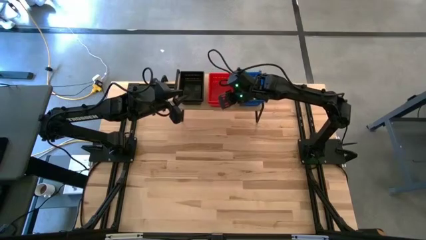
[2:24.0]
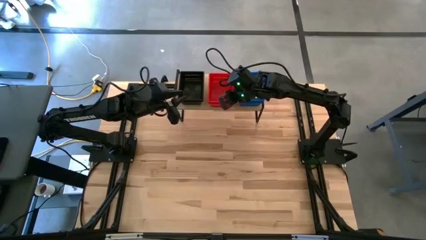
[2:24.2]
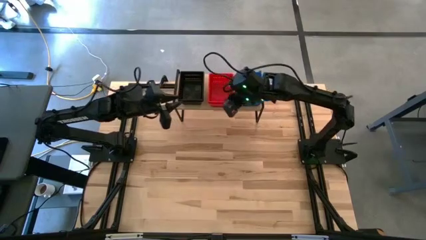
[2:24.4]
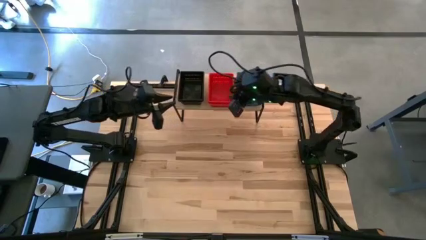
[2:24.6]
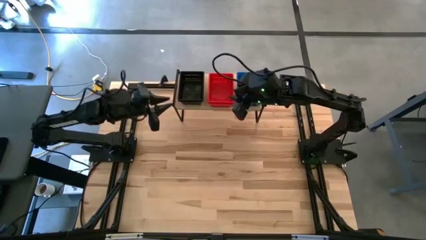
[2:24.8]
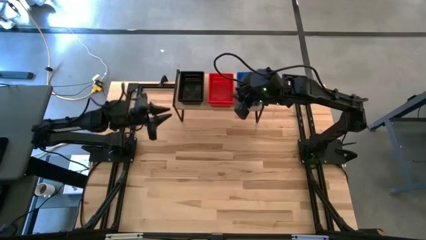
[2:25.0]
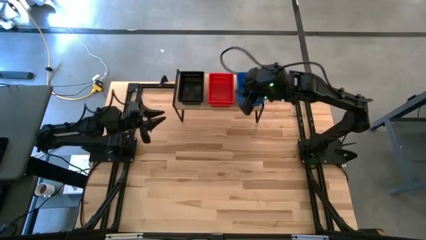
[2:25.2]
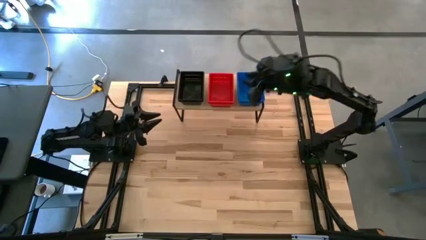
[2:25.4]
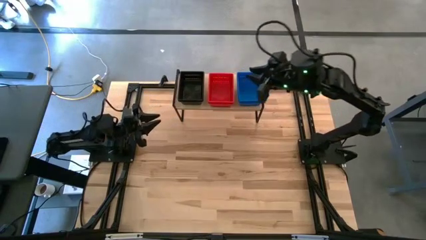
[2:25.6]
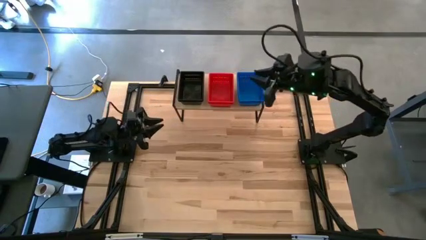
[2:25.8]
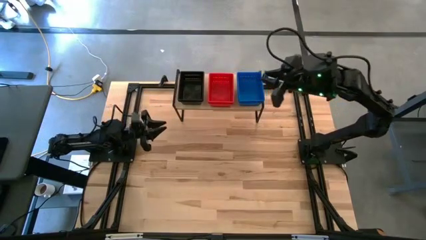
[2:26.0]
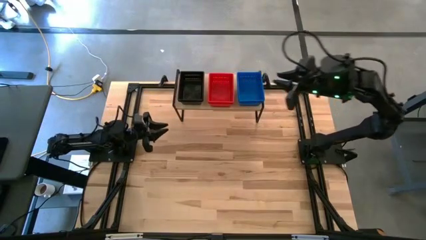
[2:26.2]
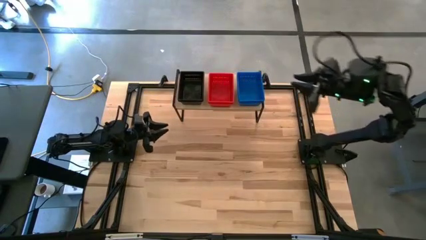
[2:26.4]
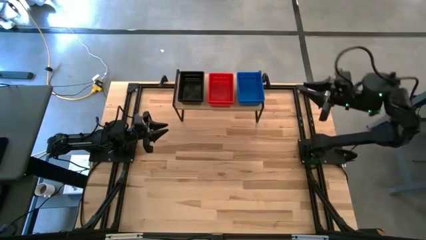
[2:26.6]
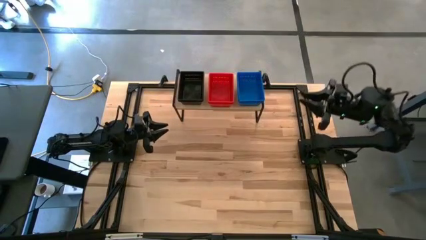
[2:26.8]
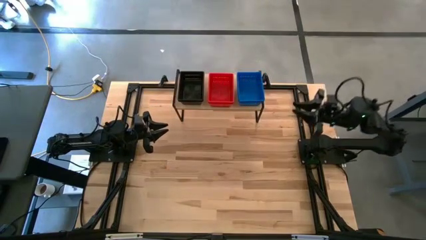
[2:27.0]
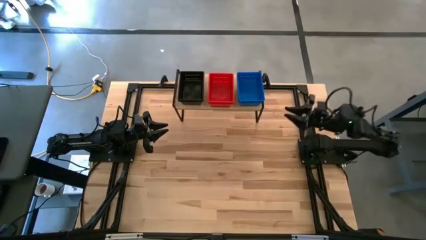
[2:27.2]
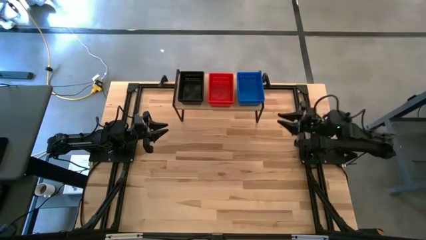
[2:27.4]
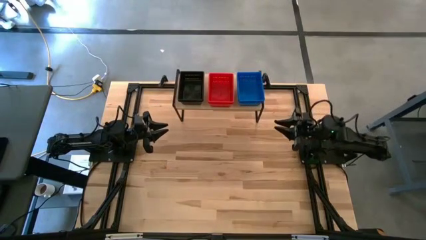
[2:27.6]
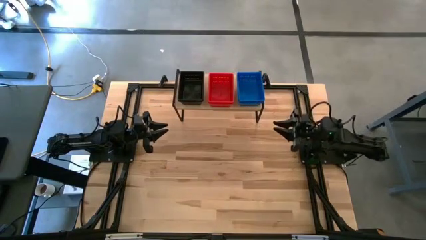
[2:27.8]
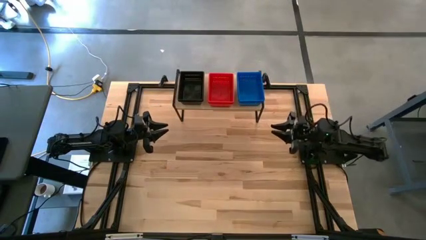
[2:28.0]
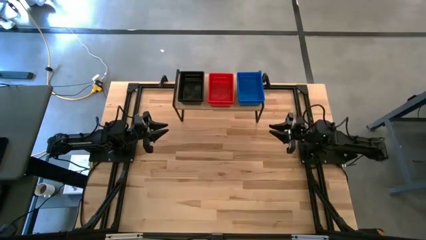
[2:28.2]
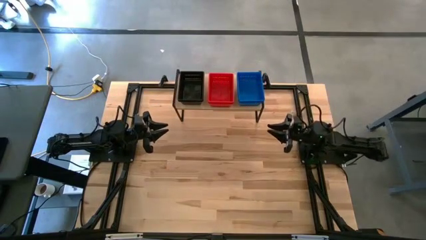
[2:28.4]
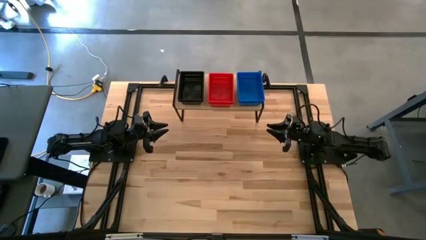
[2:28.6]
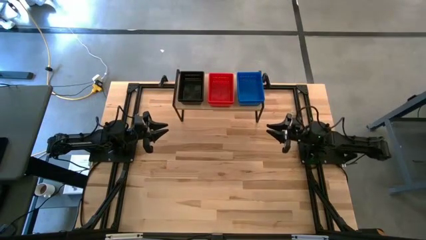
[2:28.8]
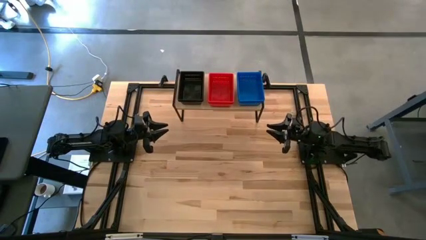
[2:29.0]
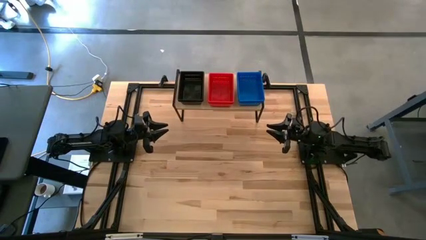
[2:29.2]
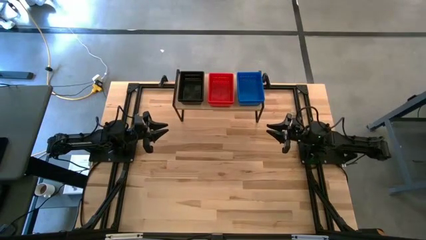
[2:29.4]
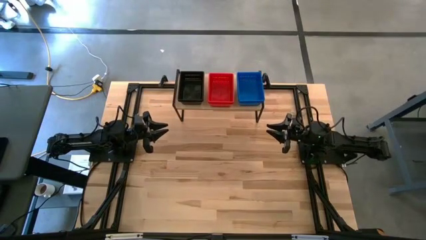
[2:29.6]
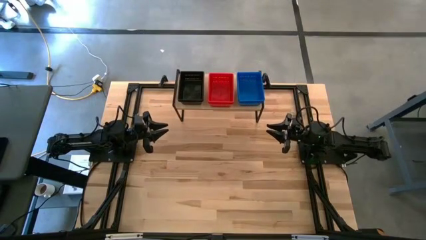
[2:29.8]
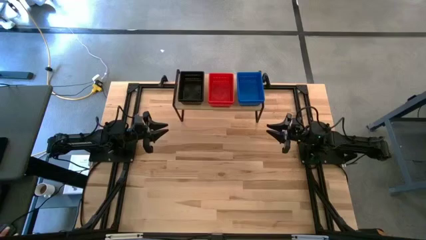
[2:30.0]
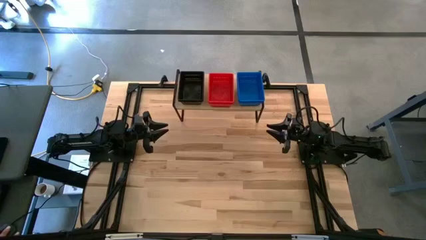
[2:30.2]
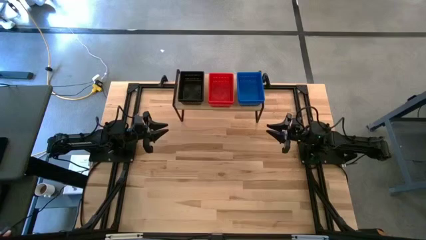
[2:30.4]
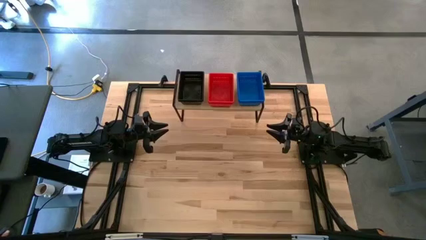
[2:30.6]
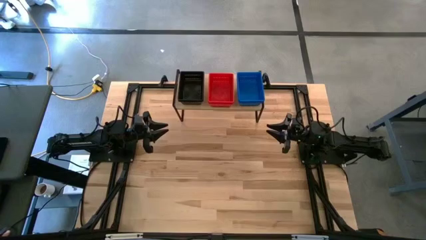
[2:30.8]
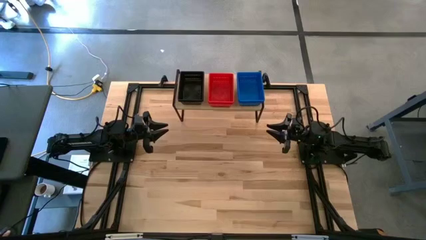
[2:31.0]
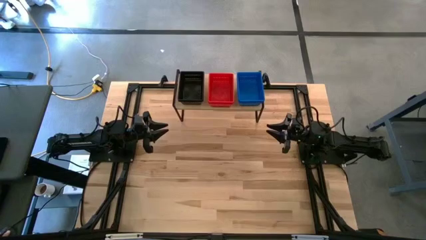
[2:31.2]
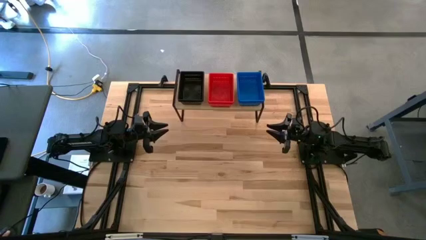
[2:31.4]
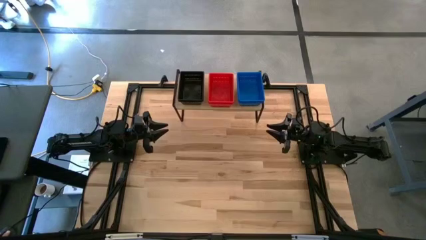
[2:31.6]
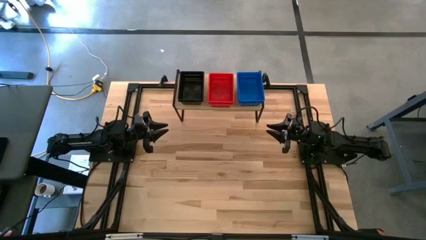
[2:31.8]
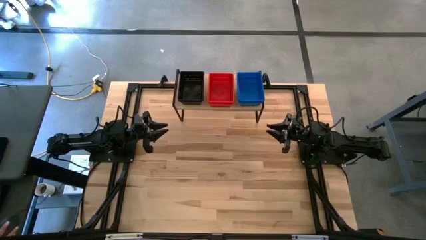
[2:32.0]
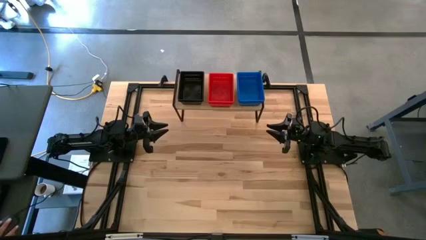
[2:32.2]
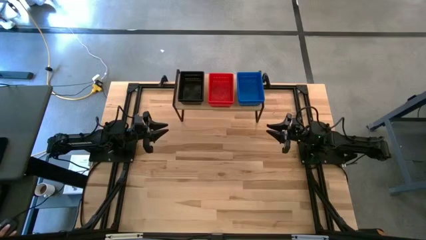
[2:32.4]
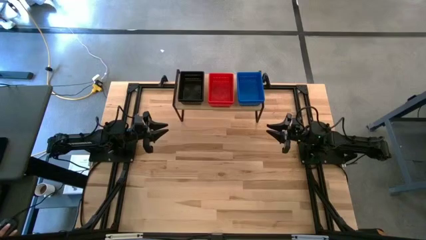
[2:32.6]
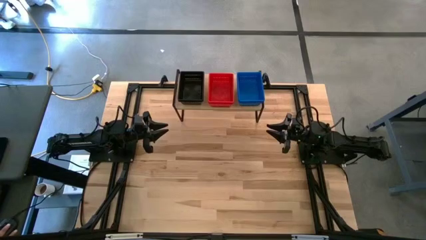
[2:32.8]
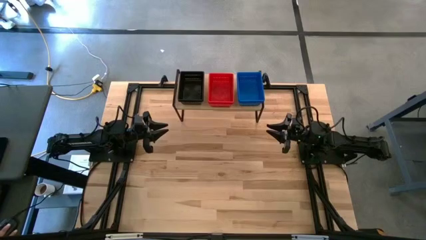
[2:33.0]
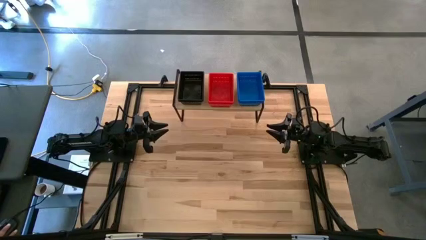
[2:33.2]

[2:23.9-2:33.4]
Task: Stack baskets on shelf by color
Return to Home Position

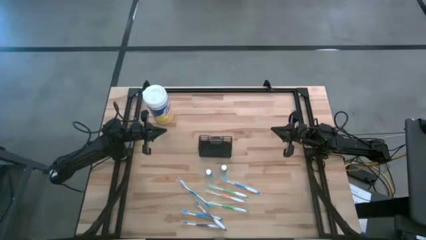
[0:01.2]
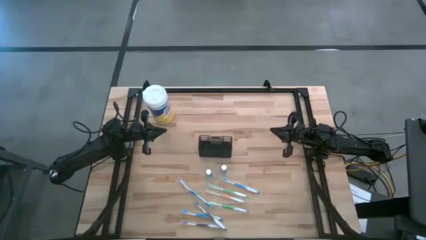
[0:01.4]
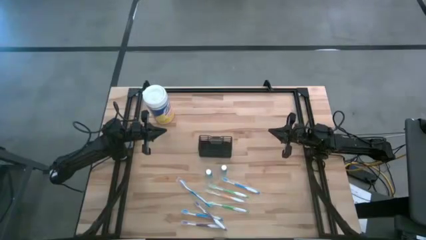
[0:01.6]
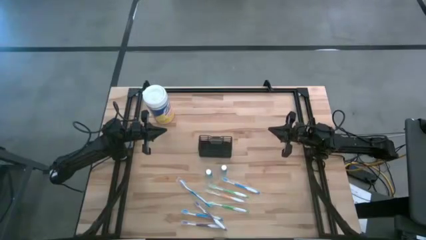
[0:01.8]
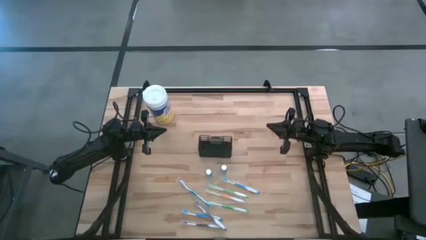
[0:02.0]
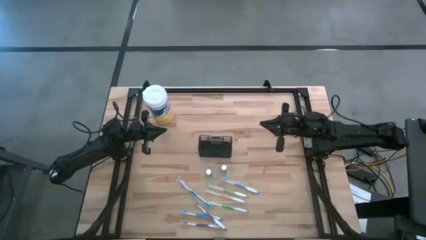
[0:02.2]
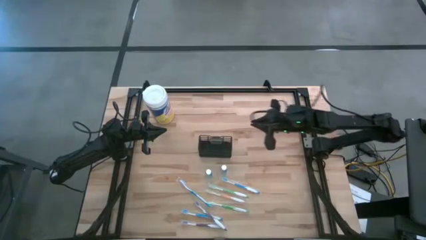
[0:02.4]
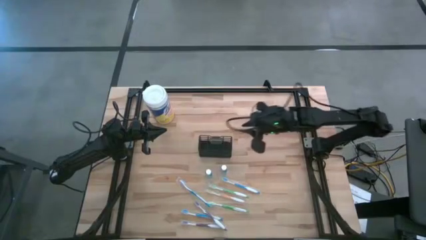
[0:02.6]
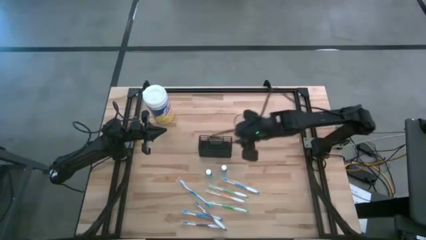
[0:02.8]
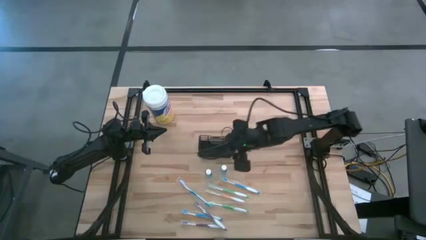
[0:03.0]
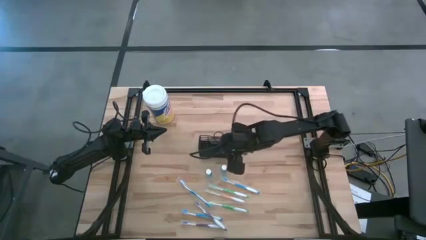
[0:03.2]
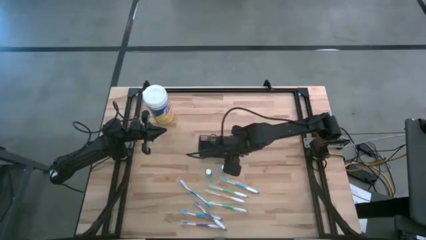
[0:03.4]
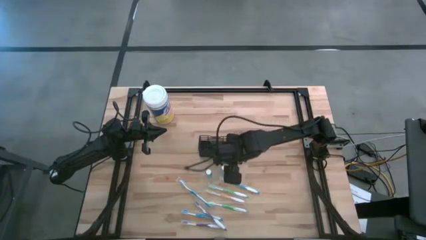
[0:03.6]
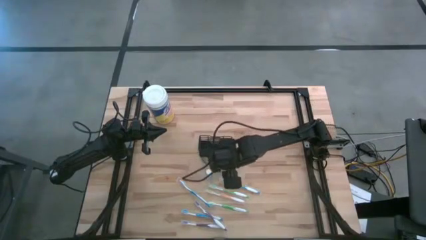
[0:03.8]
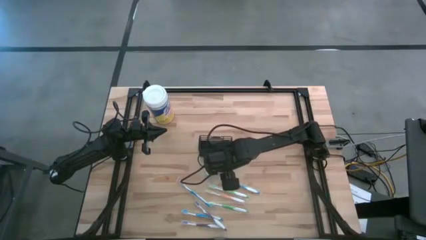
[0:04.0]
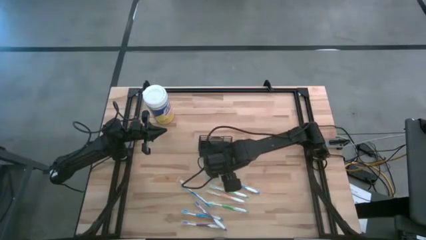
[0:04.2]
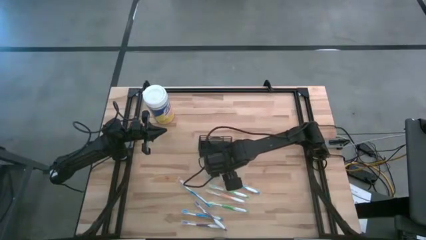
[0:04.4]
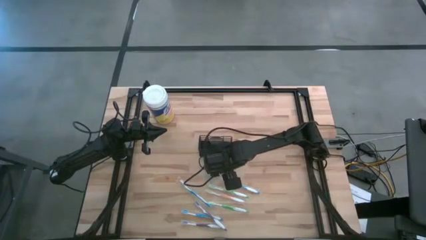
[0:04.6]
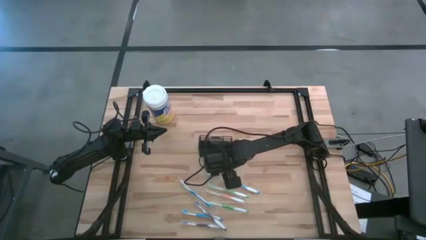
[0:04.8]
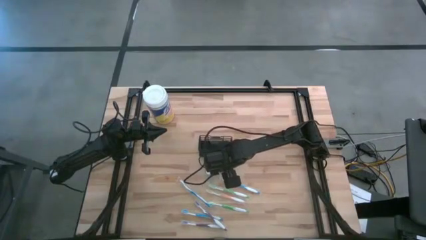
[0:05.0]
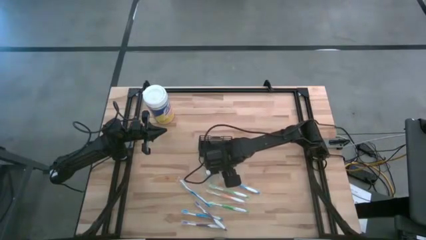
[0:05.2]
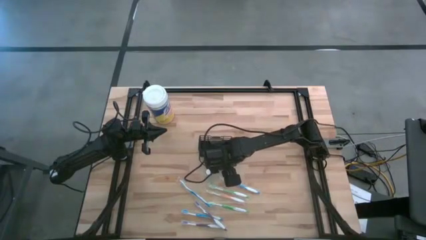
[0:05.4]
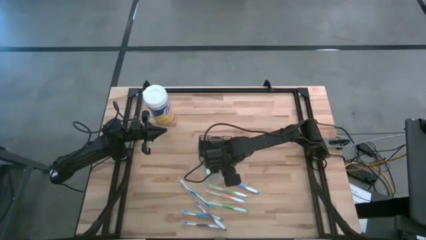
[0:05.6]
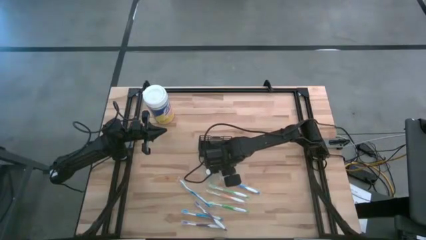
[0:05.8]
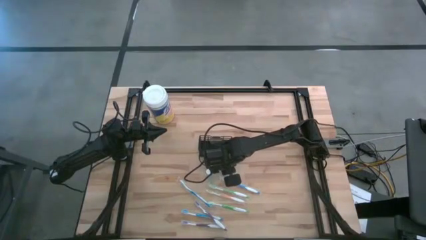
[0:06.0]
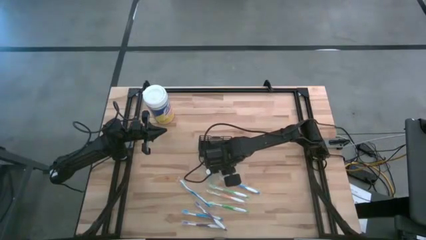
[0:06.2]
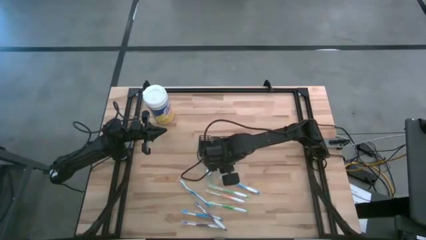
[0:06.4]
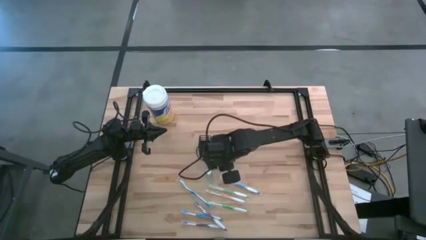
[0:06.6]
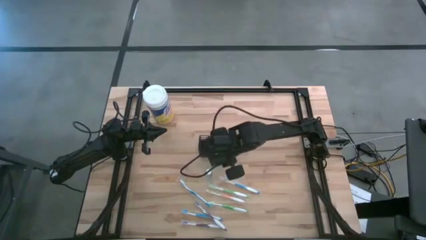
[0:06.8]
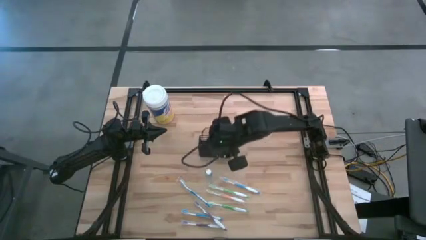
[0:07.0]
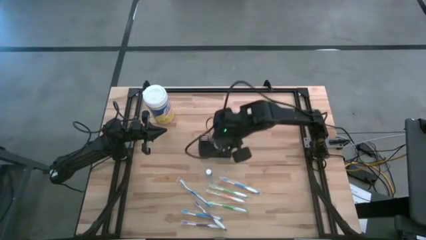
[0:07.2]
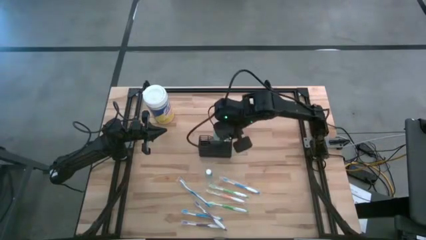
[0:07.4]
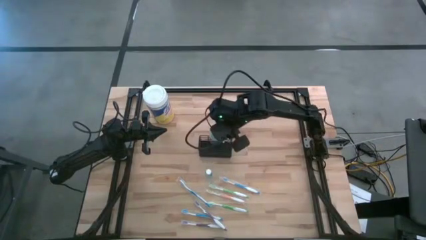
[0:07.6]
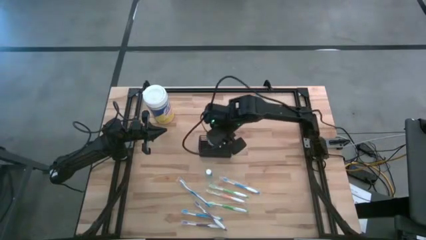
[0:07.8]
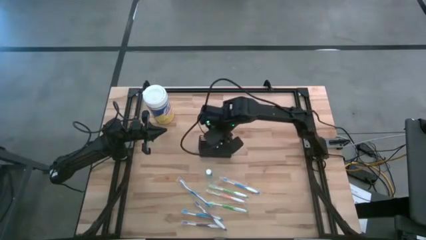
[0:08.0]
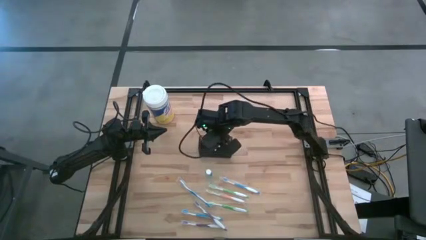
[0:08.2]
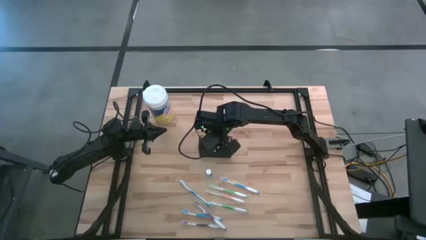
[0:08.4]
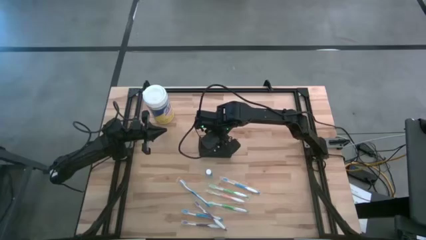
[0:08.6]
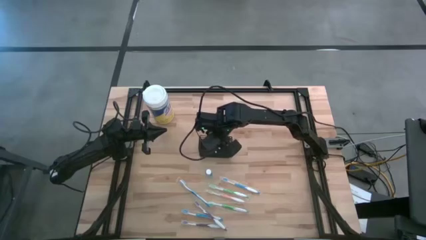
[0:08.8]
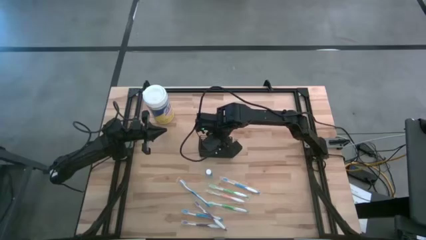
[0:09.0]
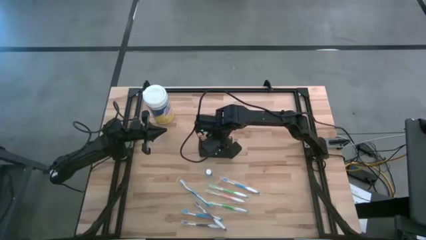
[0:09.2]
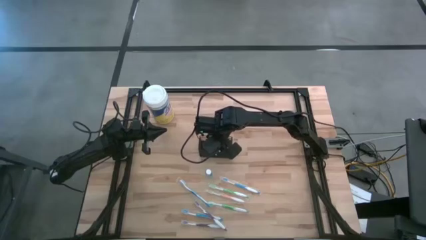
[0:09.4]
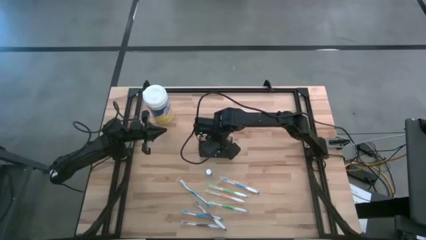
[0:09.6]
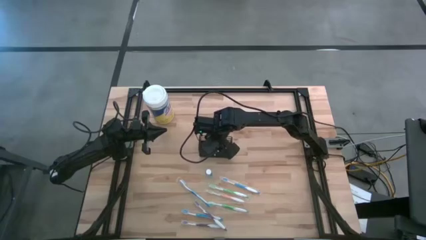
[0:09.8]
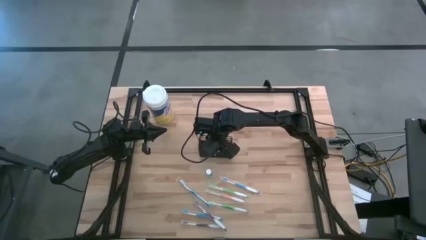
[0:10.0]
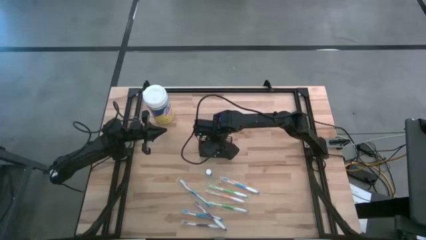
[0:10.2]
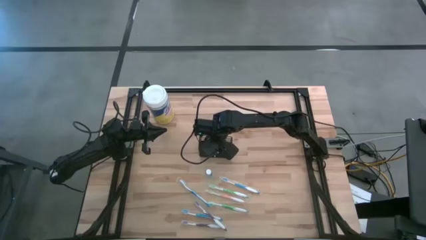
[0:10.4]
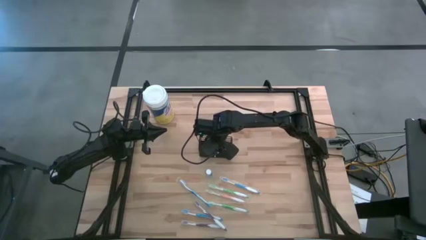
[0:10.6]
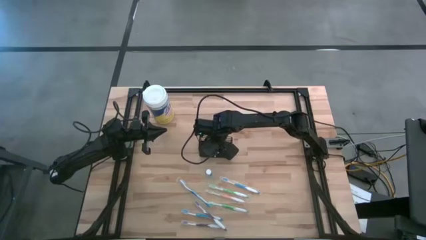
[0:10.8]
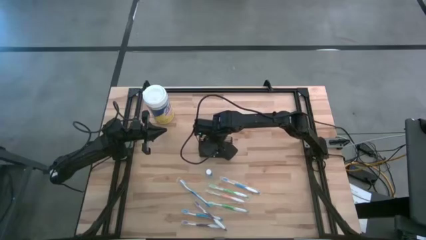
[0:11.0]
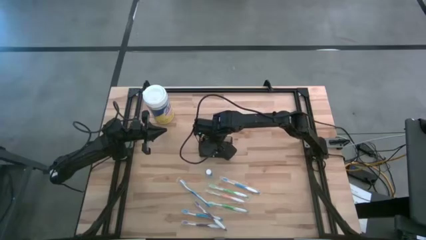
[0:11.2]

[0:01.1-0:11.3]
Task: Pick & Place toothbrushing station
Put the right blue mouthwash into the wire organizer
